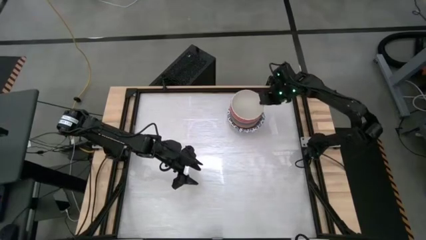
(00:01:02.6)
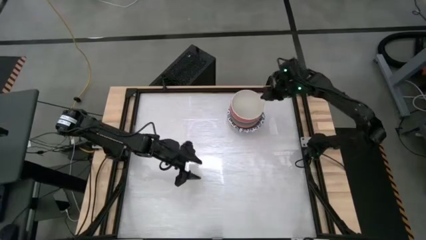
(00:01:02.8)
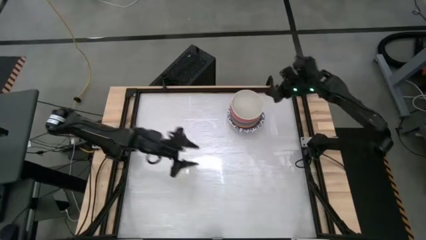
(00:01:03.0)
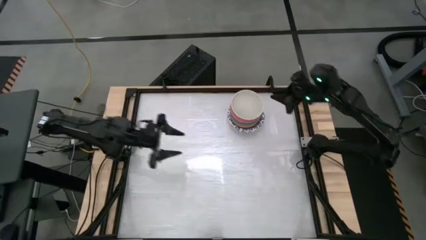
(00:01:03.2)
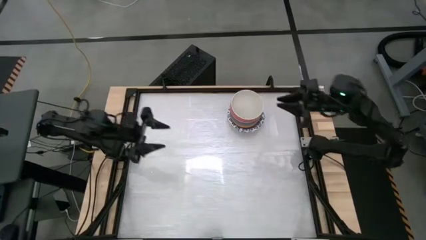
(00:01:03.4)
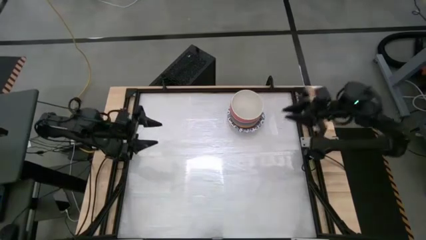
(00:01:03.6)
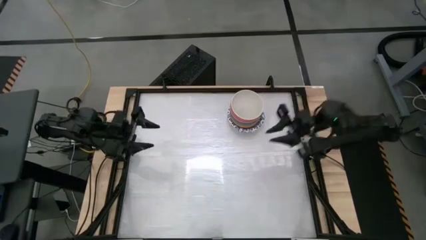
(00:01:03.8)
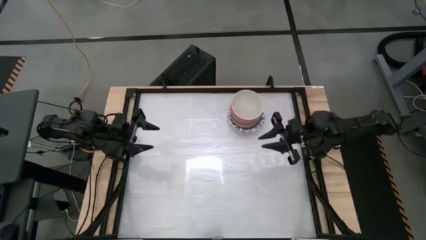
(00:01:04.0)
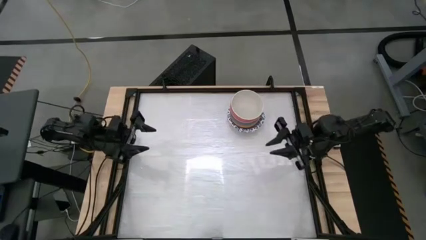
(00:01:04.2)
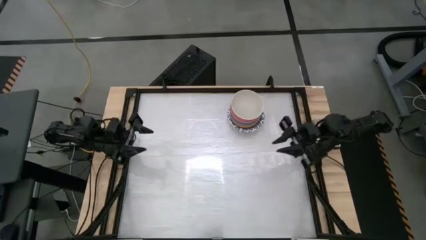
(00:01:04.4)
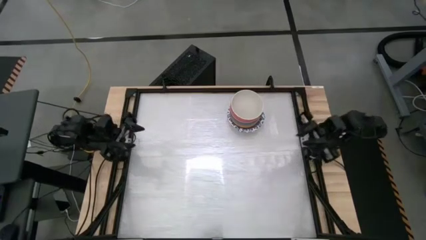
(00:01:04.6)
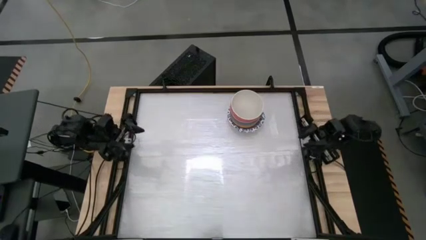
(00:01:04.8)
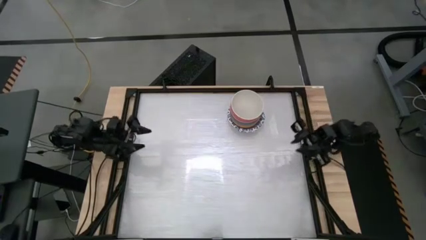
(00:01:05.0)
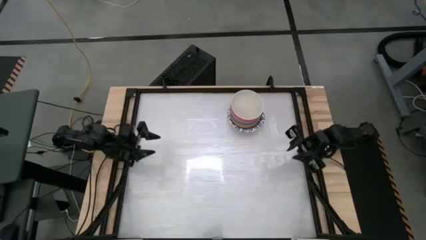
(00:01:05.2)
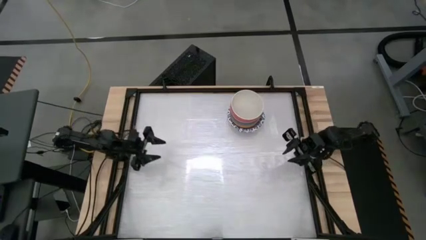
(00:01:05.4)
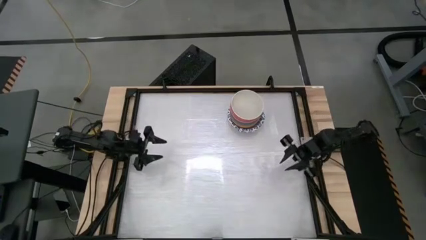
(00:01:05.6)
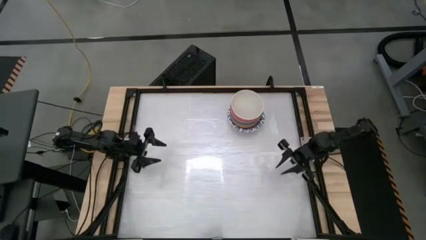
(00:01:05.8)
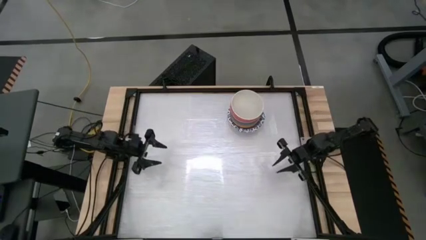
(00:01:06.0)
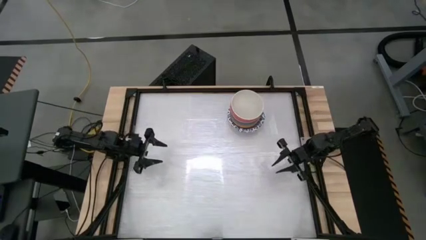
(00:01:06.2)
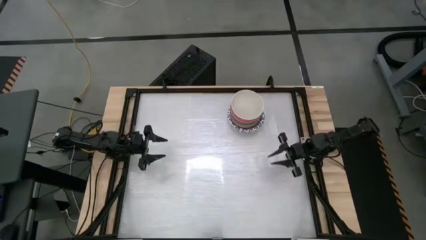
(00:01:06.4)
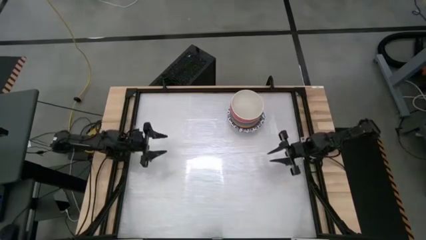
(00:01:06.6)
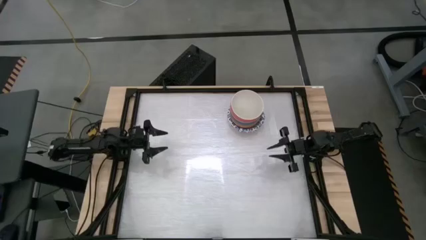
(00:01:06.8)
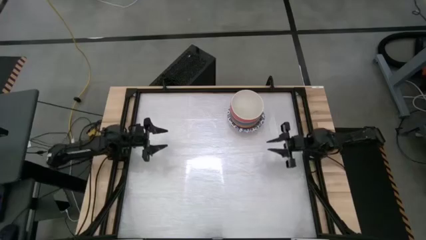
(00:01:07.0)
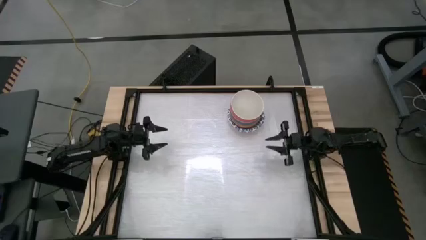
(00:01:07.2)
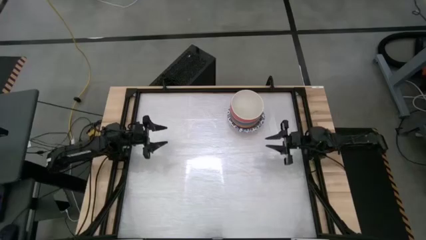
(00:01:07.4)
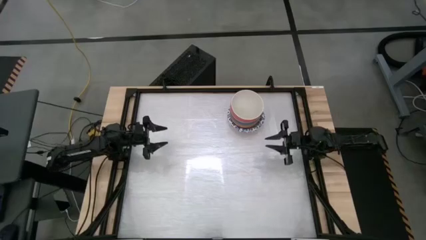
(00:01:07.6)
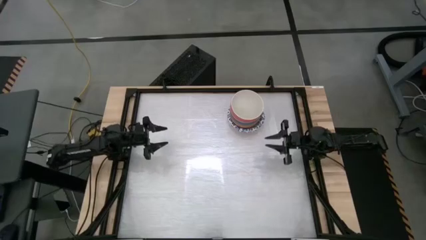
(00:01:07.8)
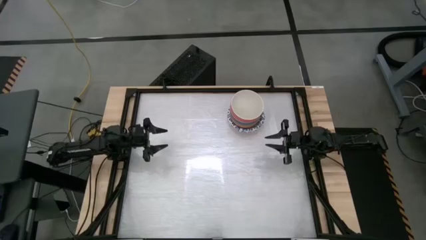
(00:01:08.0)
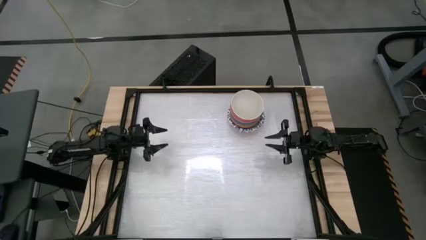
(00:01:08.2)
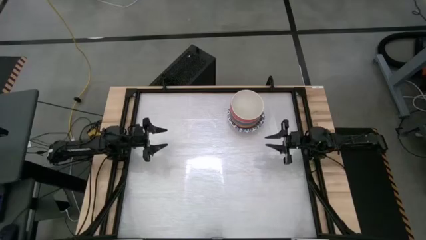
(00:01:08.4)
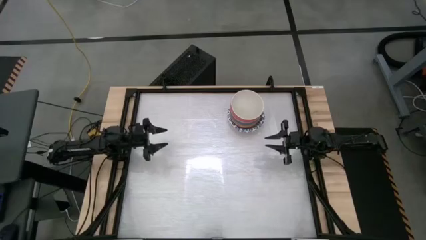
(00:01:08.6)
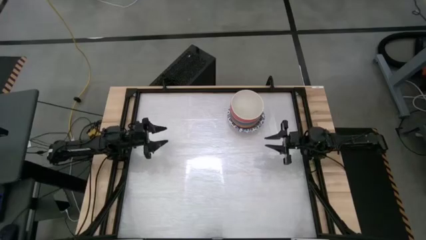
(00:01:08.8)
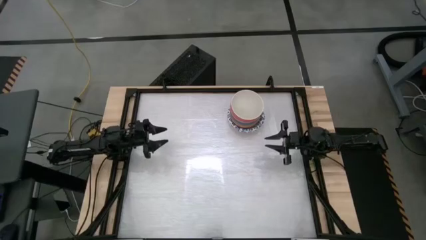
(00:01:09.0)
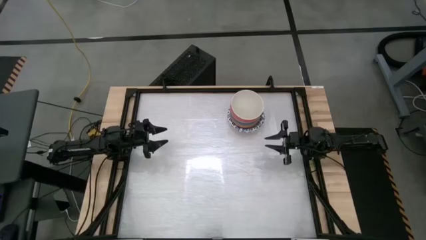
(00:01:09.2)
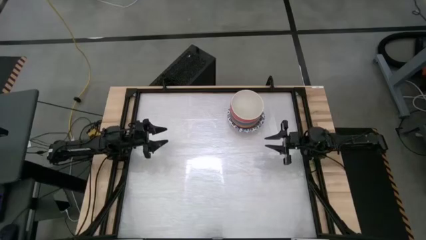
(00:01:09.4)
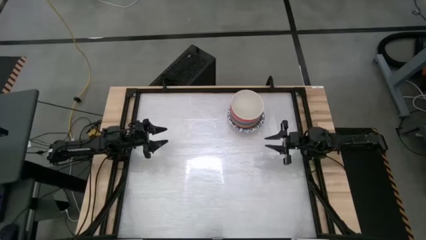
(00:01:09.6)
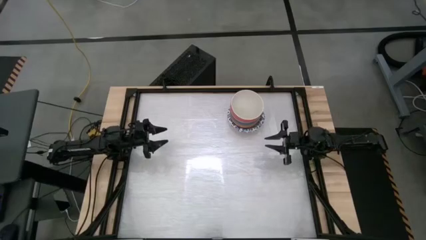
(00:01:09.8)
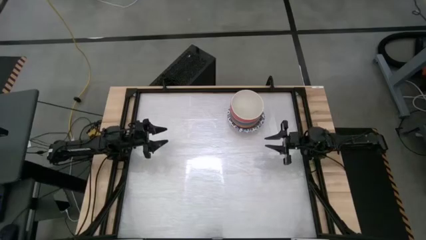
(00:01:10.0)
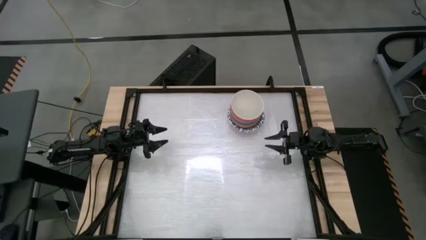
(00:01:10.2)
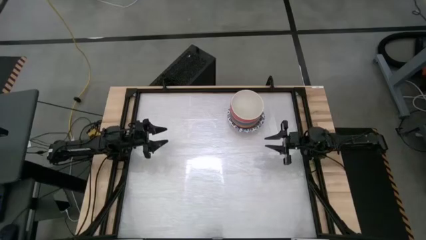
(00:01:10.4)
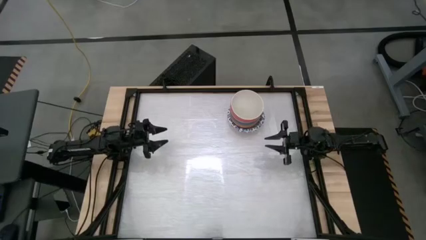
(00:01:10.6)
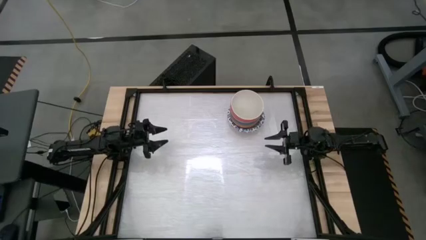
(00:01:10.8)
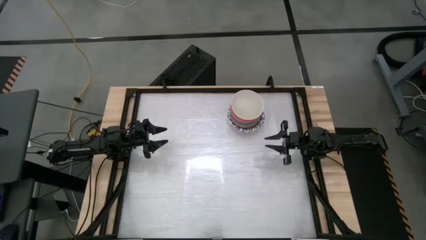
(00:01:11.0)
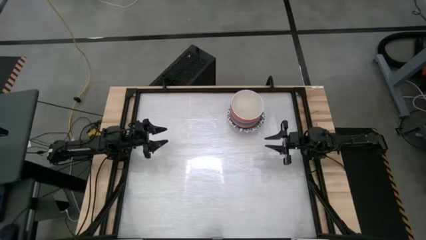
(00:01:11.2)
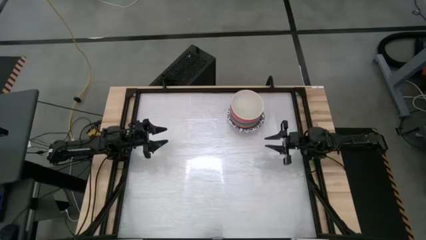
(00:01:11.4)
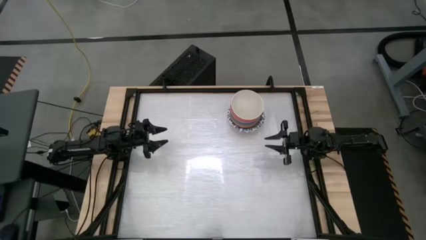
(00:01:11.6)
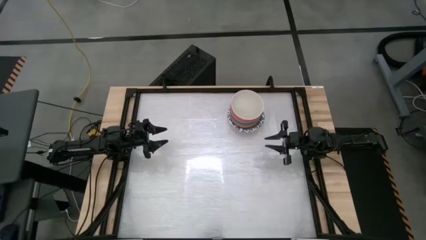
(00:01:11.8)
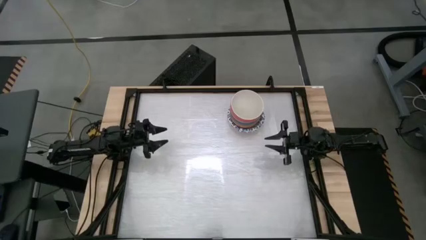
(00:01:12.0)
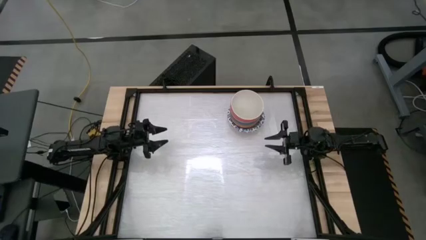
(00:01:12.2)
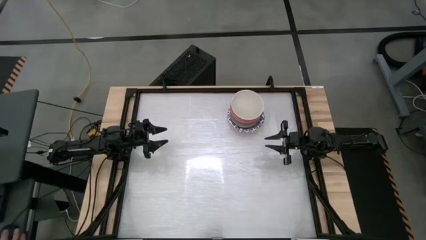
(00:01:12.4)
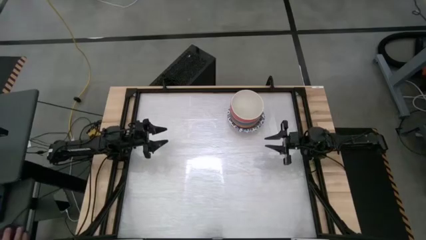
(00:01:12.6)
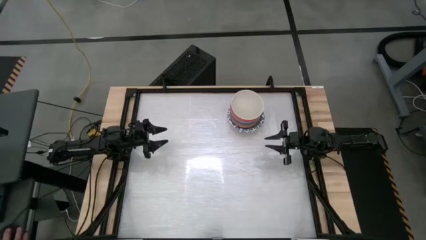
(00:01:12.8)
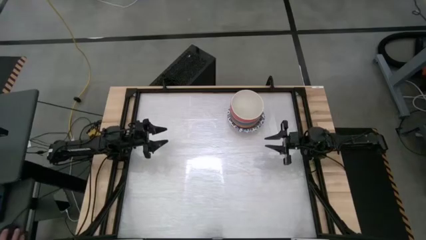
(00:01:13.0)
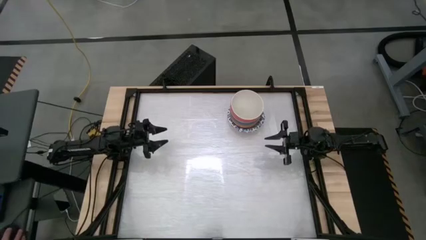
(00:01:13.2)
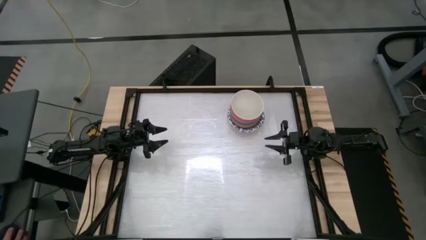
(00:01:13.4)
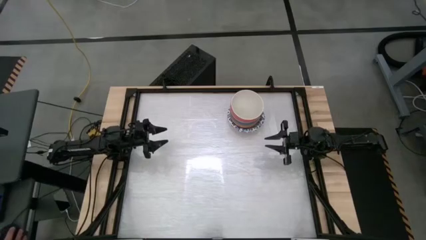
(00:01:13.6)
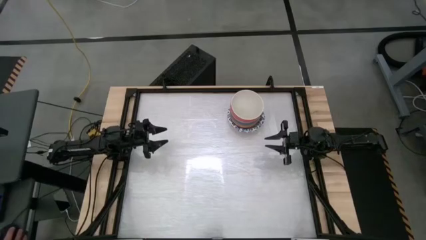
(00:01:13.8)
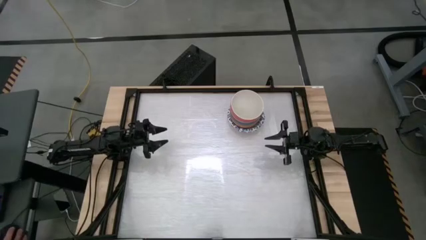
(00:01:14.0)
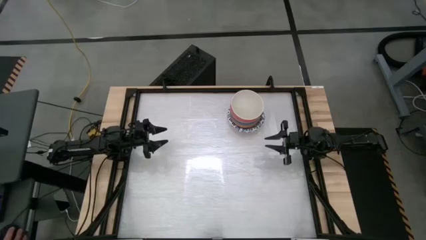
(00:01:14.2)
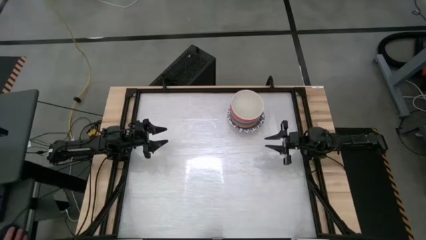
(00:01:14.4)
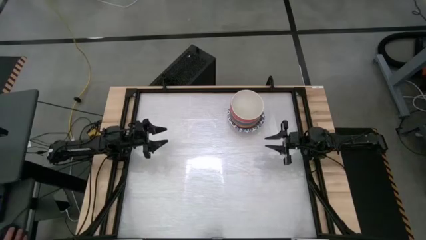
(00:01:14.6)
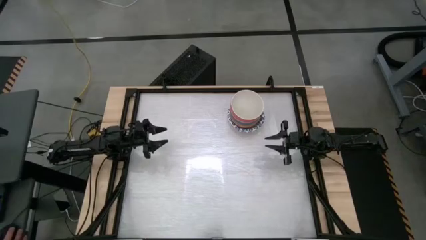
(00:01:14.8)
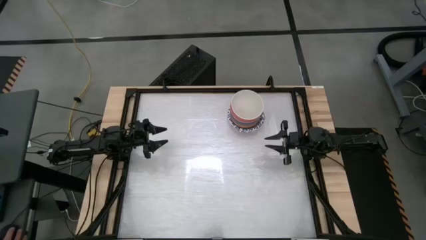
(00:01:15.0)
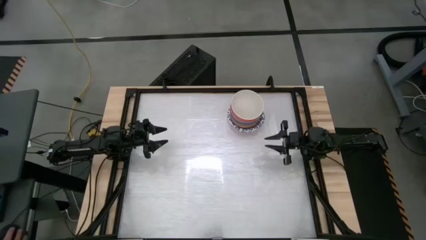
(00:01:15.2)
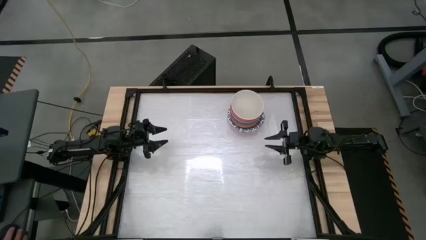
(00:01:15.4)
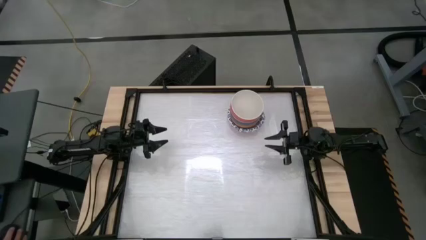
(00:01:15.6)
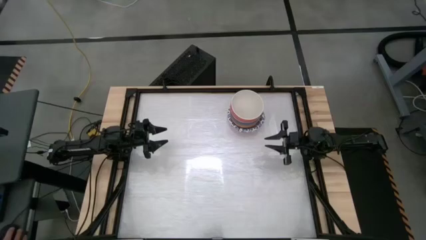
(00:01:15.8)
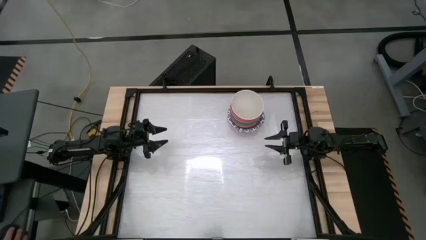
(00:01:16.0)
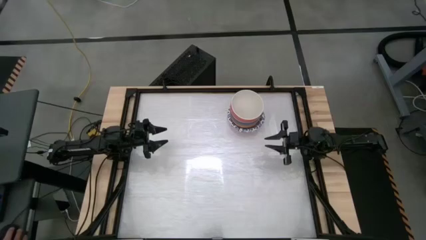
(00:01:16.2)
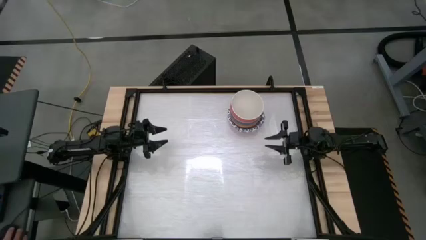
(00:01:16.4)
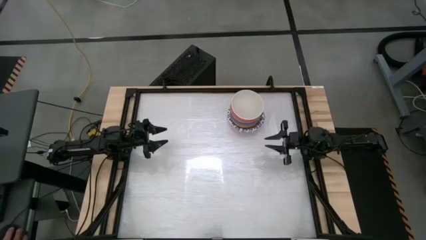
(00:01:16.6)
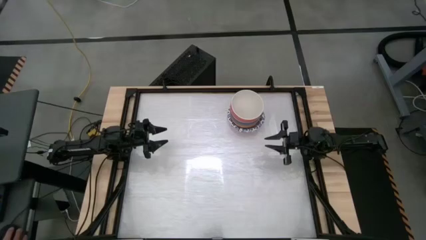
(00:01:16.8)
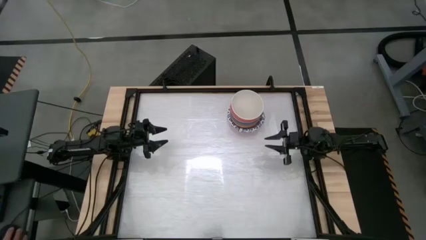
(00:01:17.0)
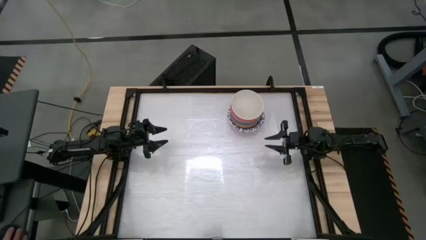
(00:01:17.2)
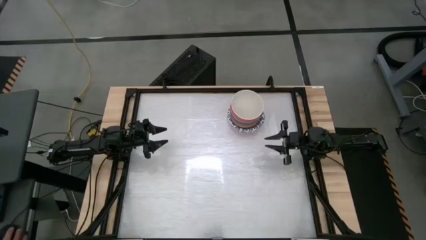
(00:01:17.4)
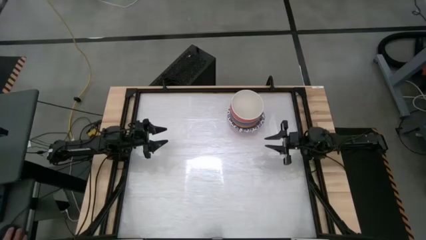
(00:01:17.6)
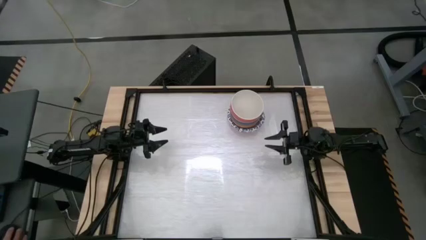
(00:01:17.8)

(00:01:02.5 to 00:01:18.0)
Return to Home Position
